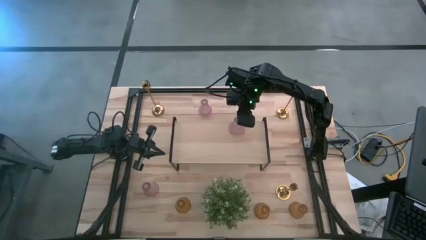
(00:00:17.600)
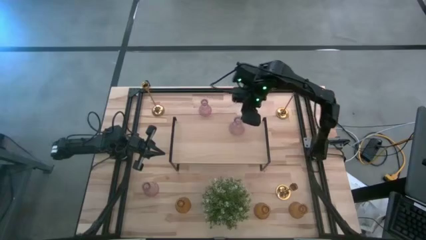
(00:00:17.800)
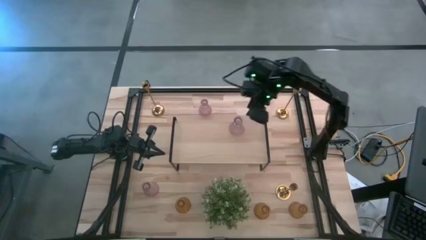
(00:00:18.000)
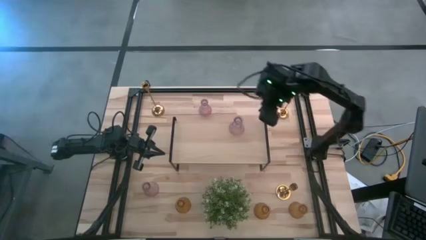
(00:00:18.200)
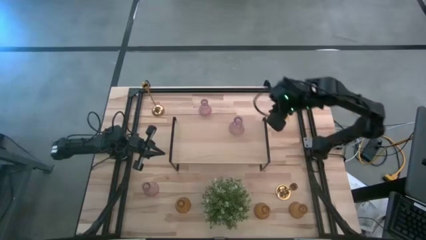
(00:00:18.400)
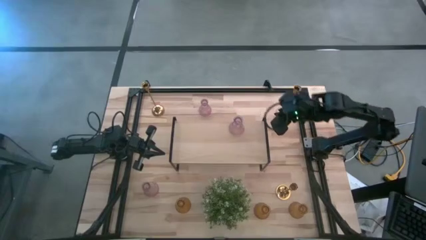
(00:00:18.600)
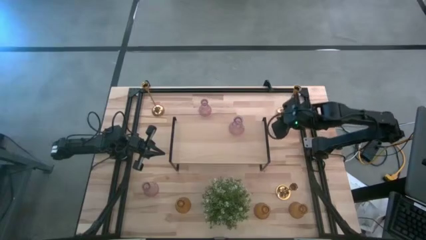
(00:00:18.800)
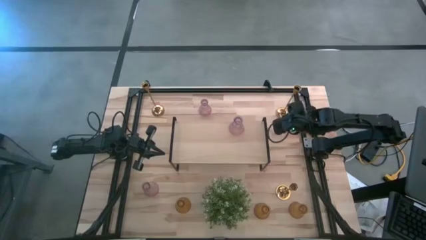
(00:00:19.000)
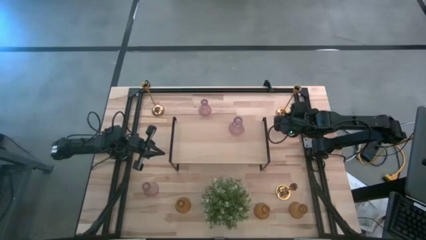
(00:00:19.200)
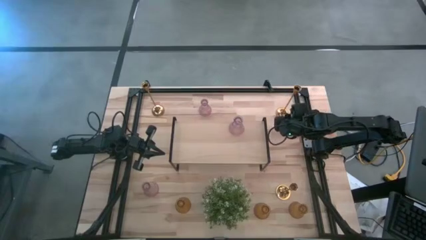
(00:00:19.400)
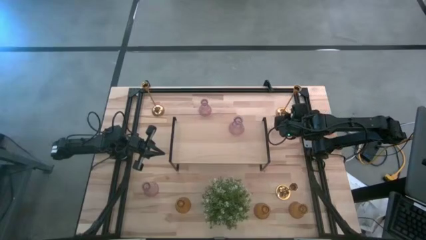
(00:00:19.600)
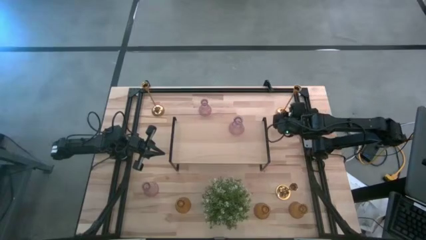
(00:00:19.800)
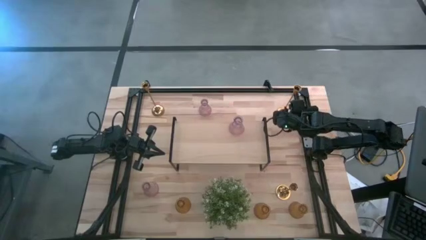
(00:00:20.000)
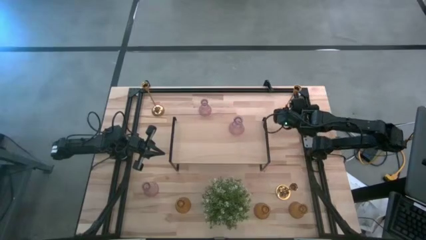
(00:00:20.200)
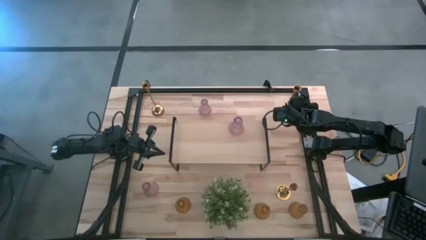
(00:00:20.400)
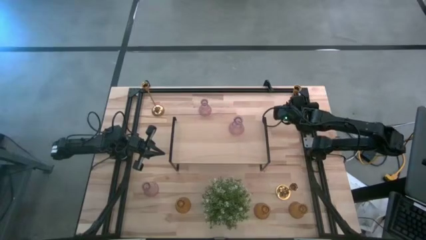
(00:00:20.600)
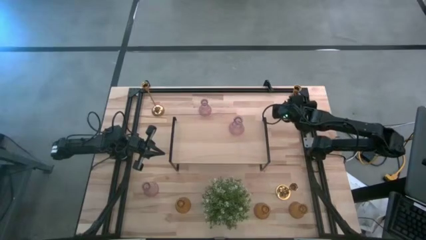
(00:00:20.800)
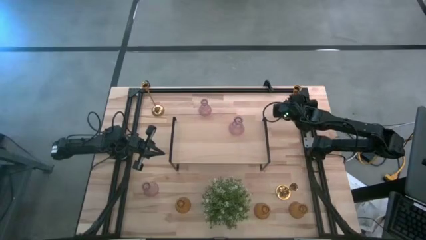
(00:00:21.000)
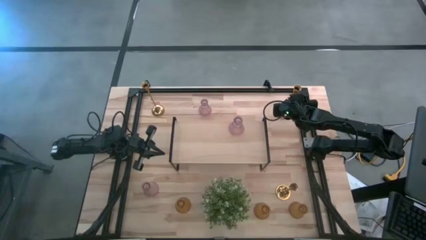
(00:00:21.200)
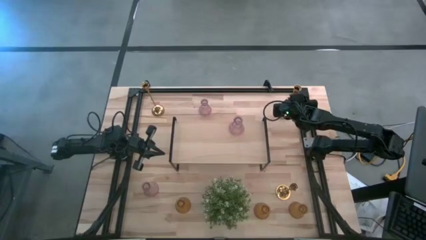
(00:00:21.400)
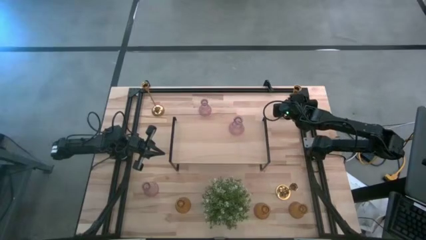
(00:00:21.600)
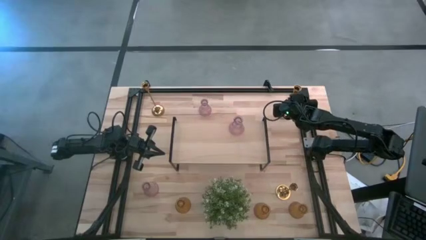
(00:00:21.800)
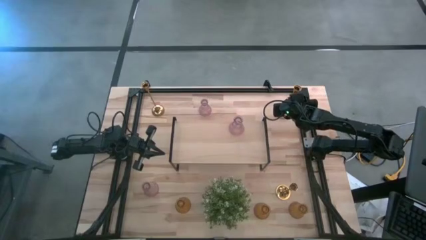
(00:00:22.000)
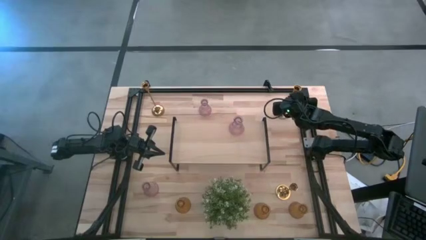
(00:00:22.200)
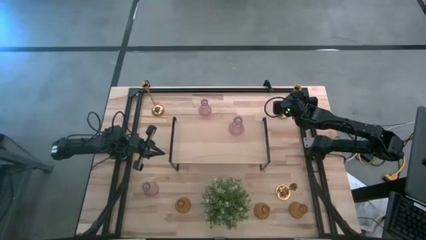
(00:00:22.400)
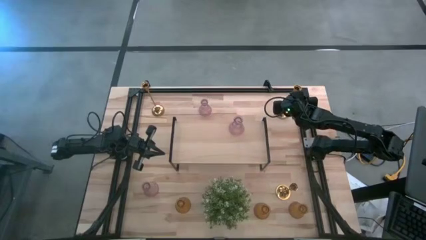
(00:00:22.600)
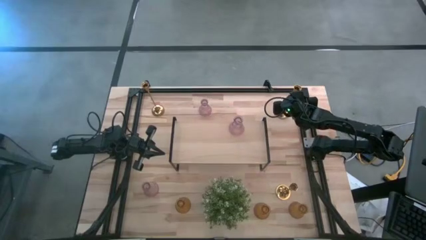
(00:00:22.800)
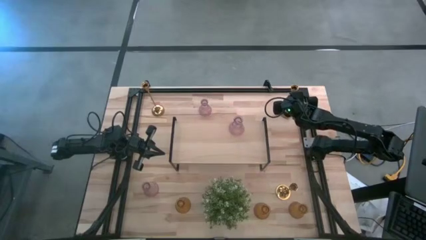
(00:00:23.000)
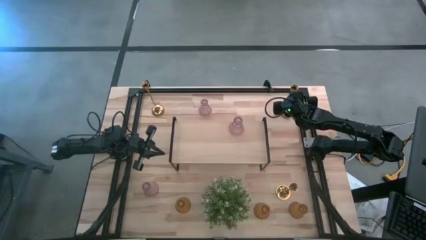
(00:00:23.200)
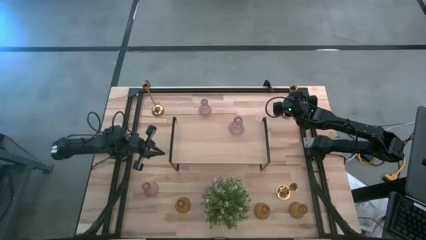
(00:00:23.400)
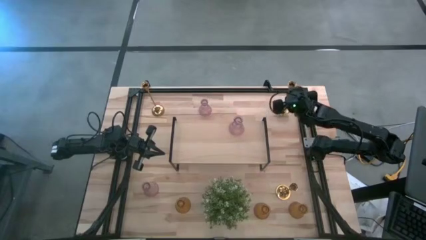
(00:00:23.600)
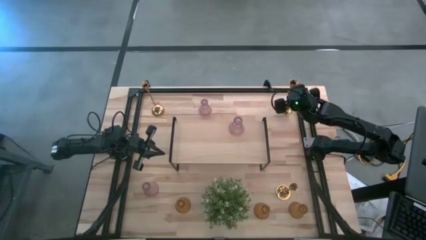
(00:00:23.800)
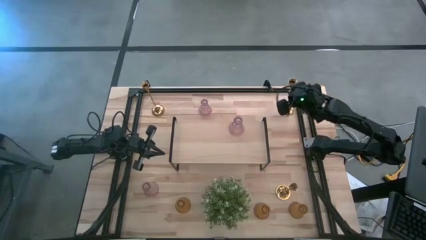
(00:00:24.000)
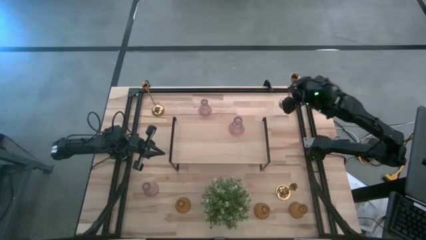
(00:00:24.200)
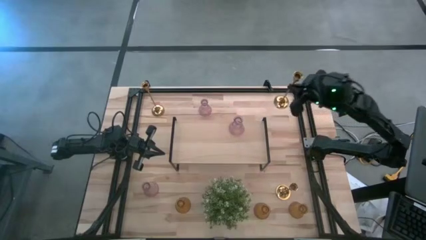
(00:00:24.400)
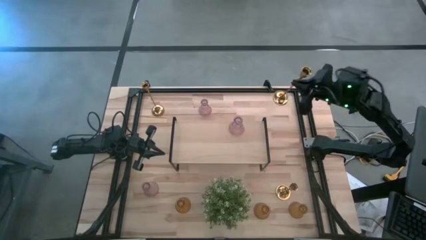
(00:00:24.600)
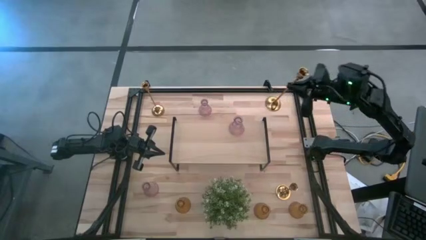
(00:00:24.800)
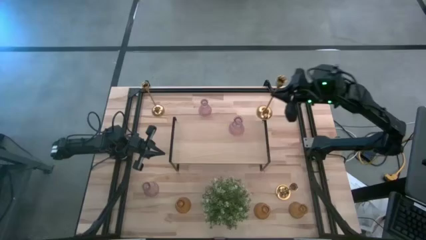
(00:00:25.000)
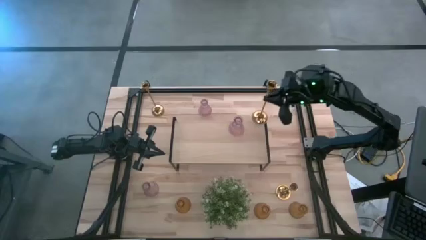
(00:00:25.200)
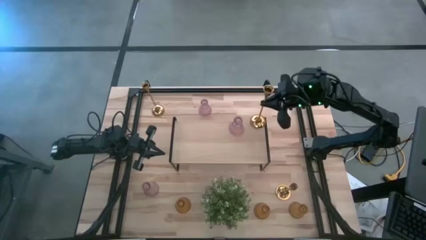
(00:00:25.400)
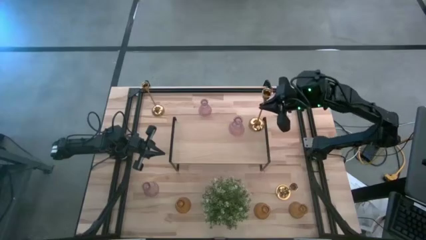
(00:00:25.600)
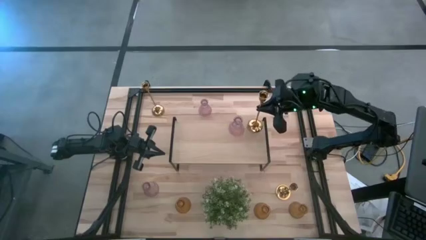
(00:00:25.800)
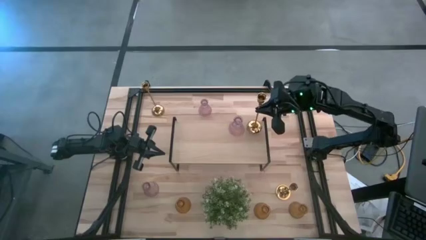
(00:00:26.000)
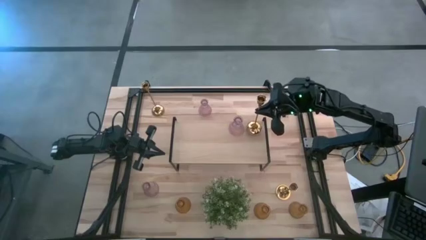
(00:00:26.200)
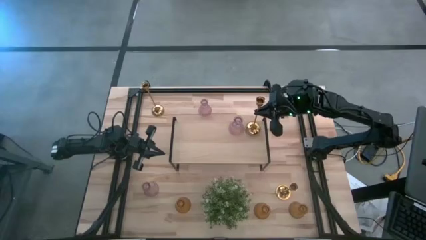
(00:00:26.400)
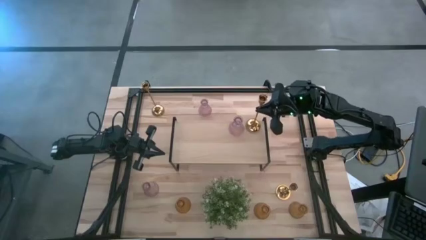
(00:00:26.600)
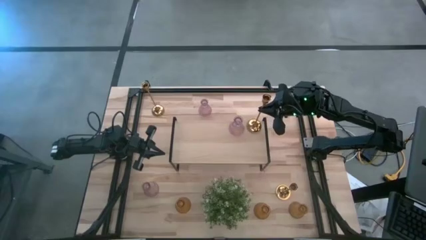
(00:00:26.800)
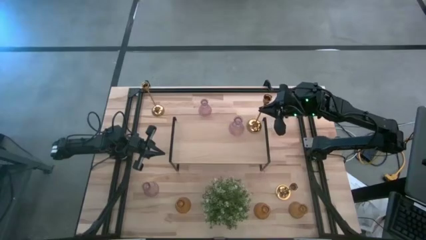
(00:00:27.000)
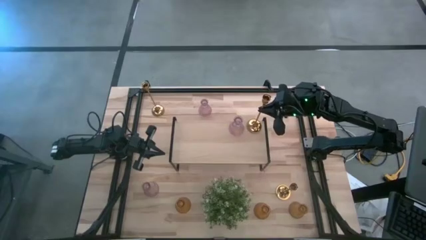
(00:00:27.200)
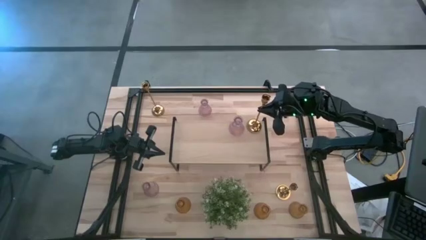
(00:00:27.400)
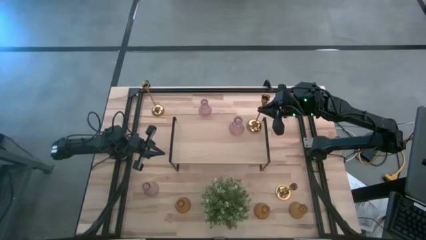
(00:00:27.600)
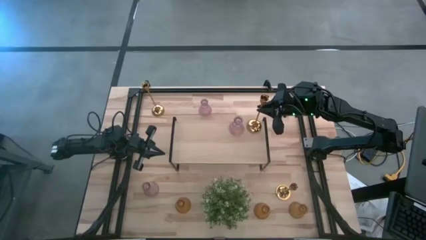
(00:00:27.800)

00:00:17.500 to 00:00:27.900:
Task: Pick & Place candle stick holders
Put the top right gold candle holder on the shelf

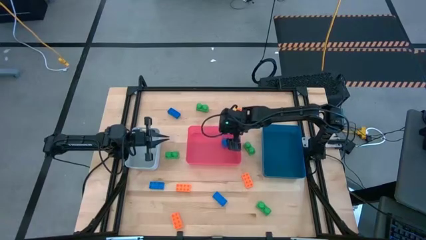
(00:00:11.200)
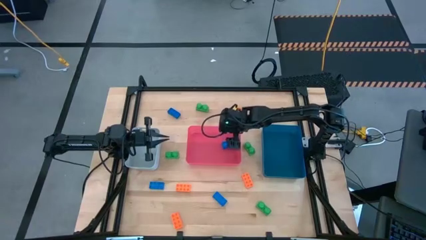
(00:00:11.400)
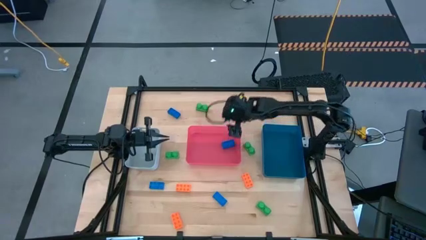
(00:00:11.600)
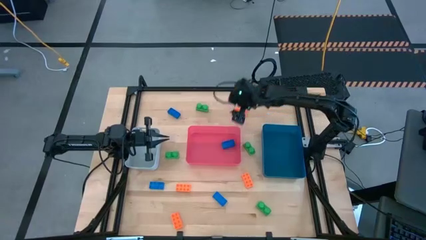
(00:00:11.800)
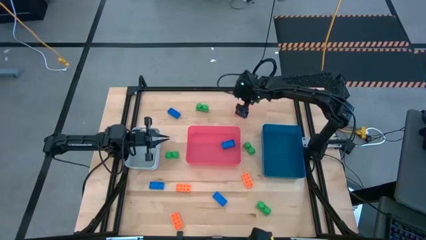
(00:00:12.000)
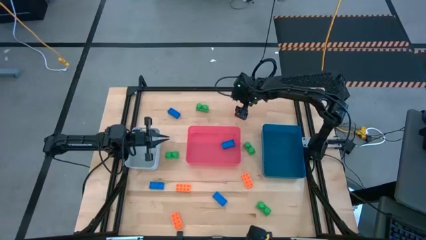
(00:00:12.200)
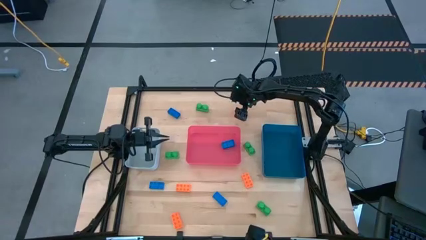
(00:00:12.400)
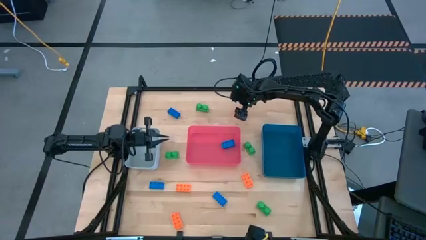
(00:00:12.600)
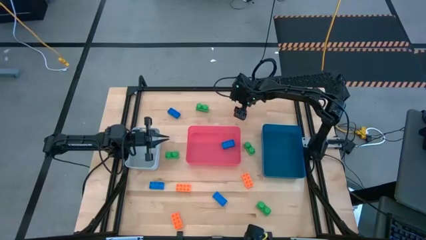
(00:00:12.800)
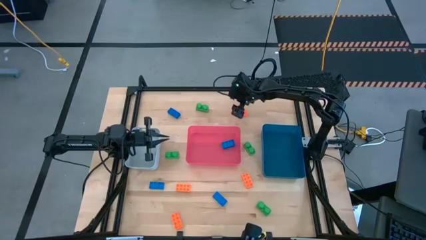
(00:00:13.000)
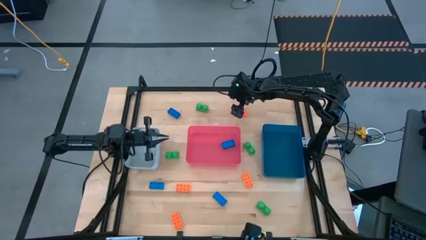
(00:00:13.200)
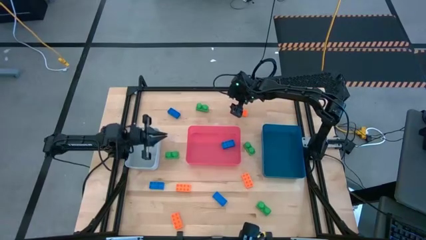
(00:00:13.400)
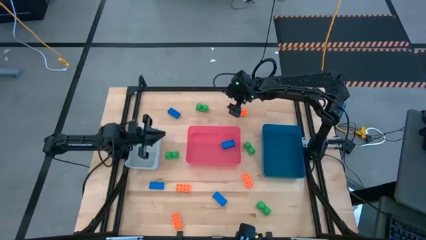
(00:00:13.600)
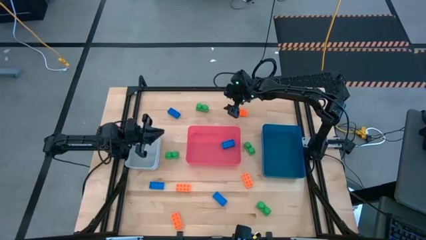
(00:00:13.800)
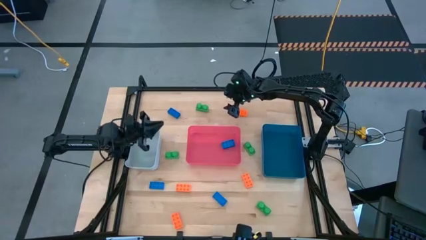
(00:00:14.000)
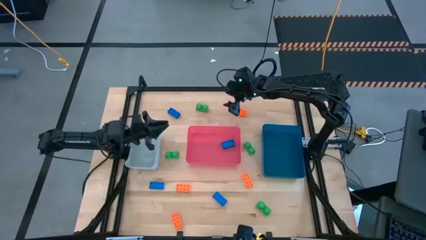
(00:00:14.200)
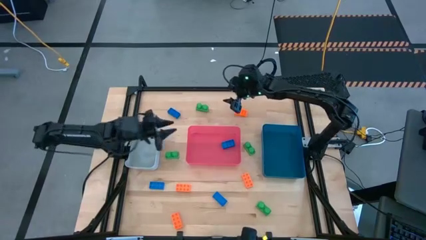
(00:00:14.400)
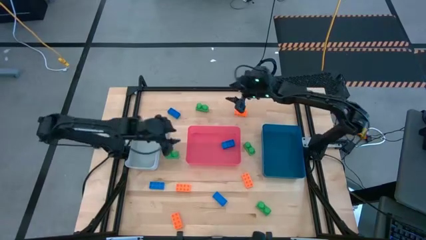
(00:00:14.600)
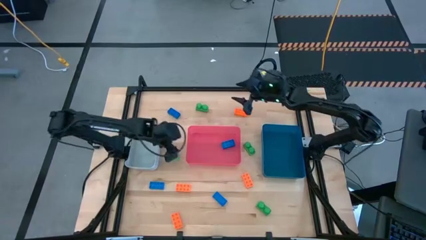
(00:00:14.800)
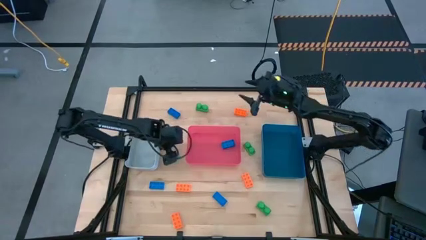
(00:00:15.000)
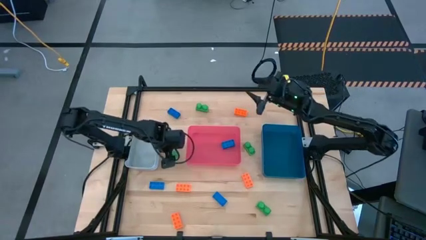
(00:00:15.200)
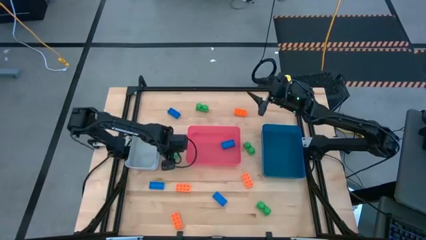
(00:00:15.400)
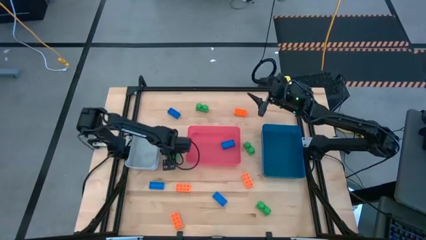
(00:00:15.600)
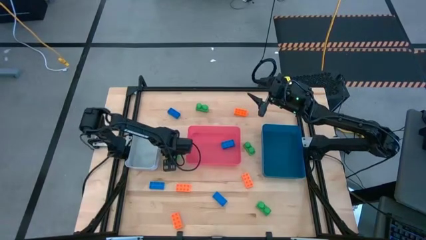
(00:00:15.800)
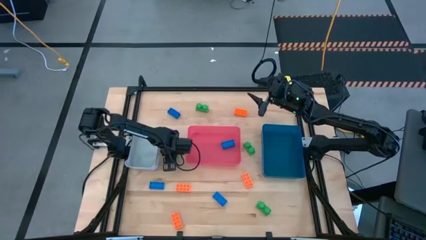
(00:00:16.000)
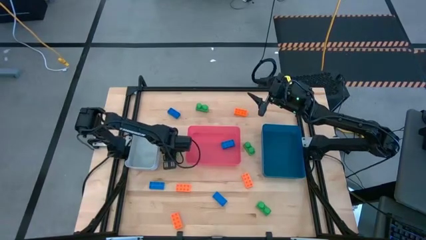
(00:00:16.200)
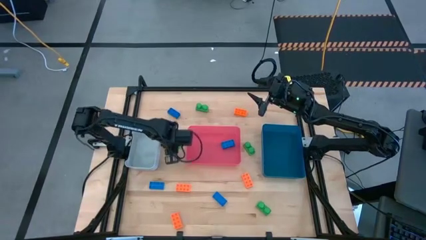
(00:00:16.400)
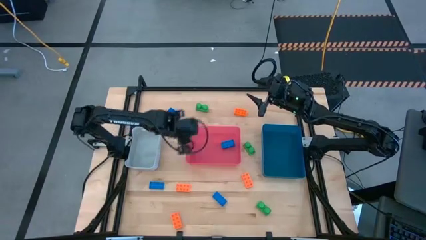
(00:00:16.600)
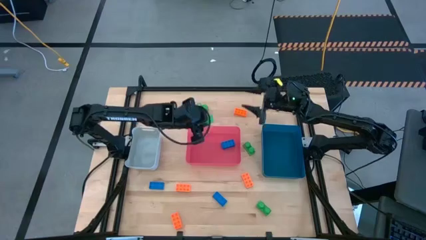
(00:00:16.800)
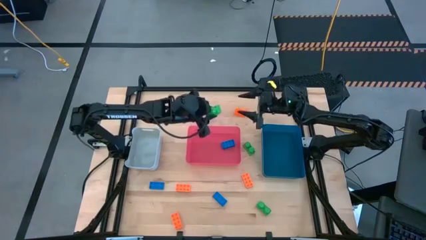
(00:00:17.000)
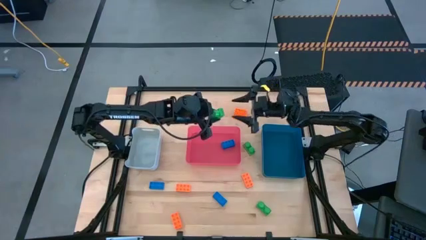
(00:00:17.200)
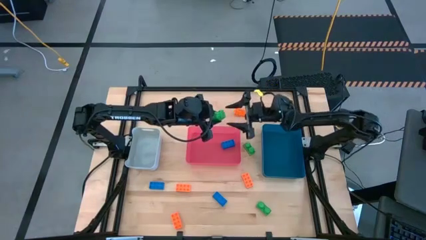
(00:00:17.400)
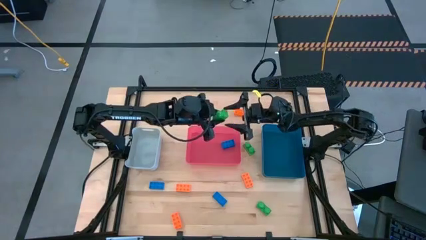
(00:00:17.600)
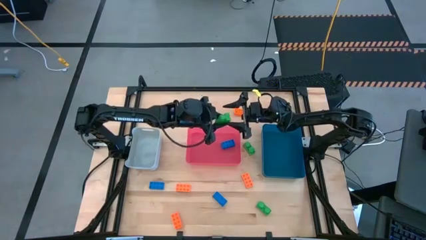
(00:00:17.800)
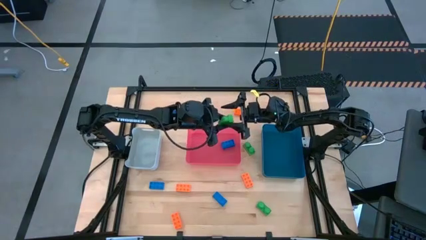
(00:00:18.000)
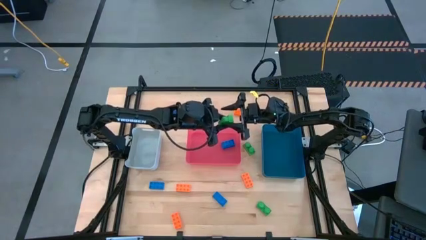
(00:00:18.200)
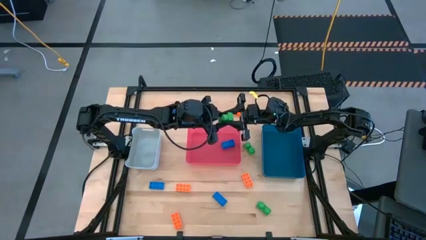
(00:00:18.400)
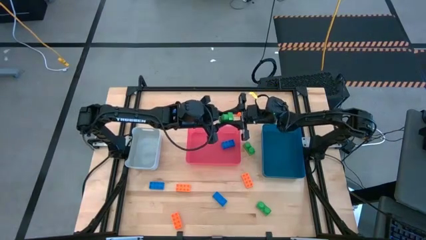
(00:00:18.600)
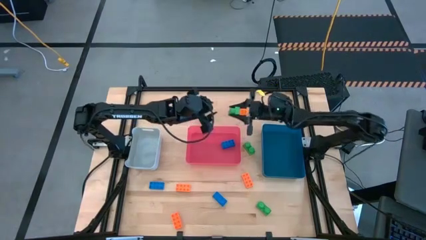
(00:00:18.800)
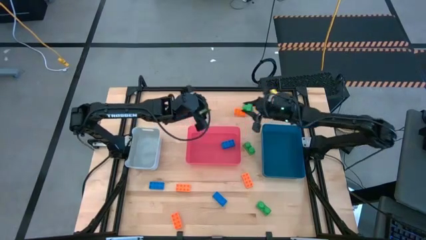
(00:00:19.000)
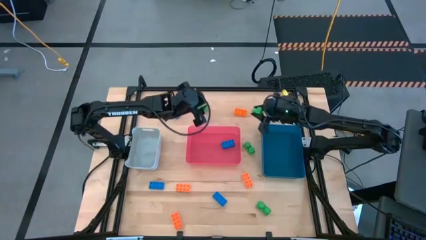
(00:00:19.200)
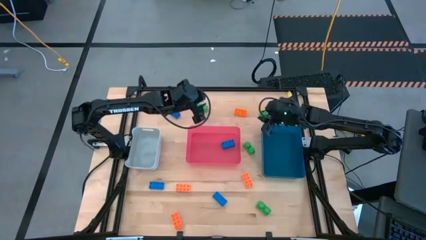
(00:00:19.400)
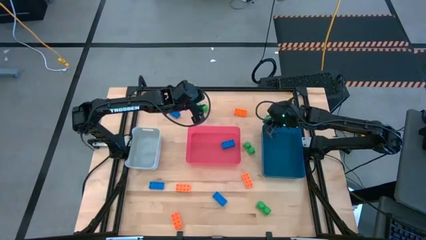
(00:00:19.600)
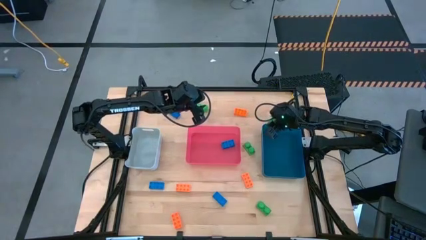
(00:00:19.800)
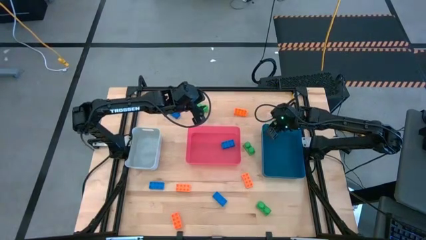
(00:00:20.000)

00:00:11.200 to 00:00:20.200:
Task: Sort & place blocks by color
Put the green game piece into the blue bin
